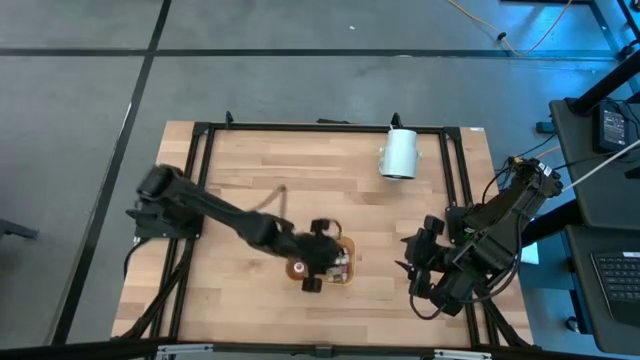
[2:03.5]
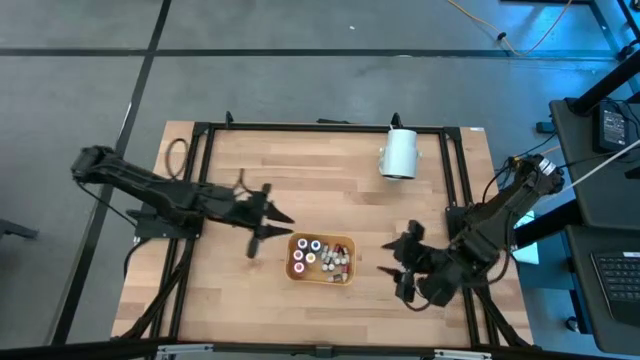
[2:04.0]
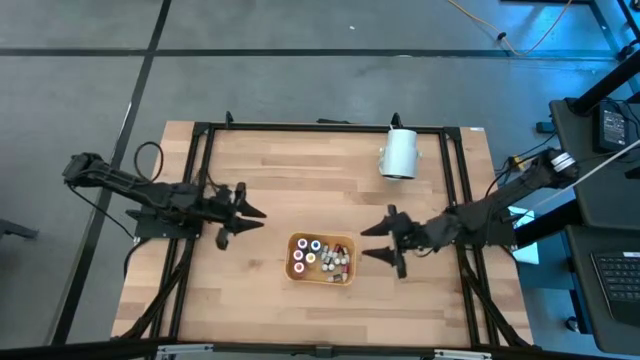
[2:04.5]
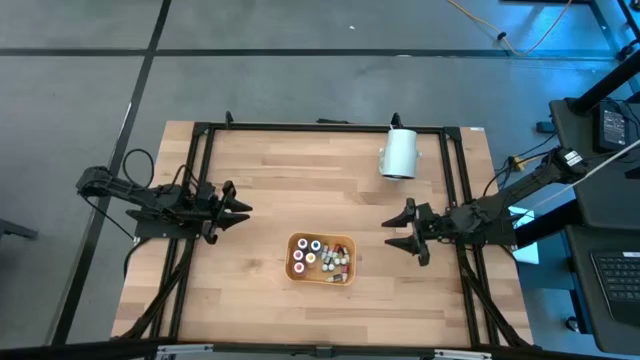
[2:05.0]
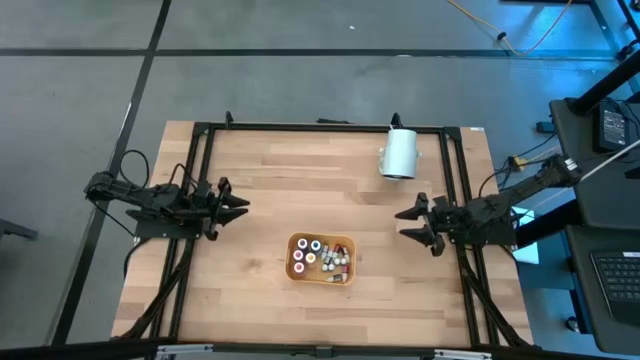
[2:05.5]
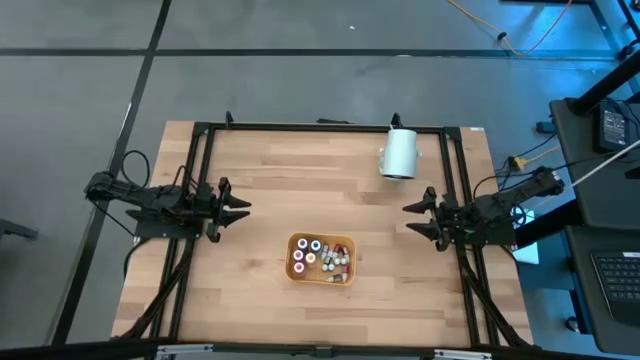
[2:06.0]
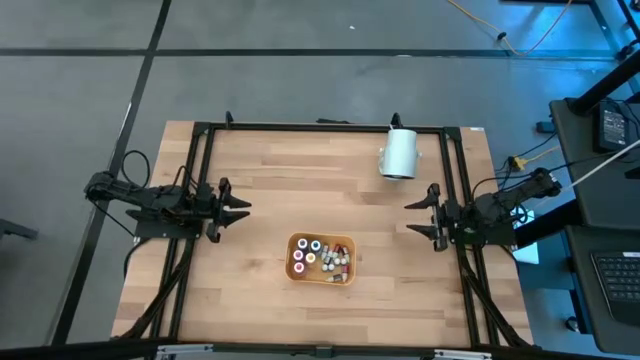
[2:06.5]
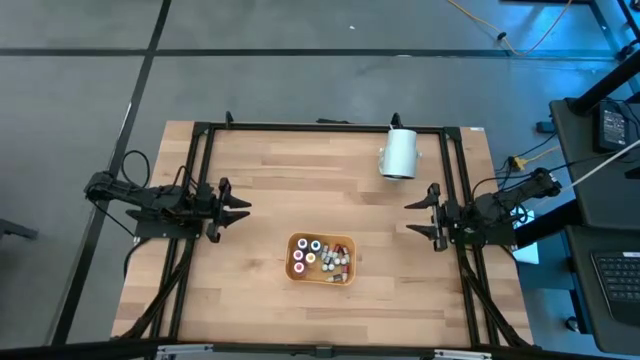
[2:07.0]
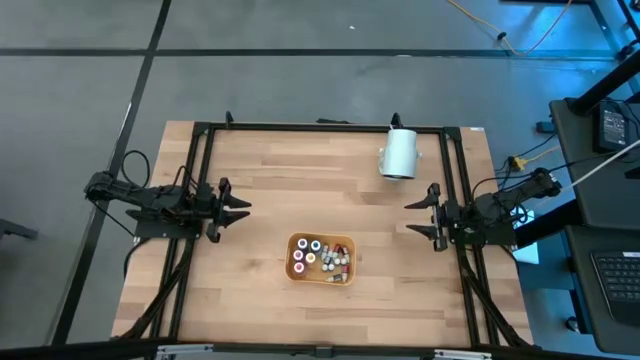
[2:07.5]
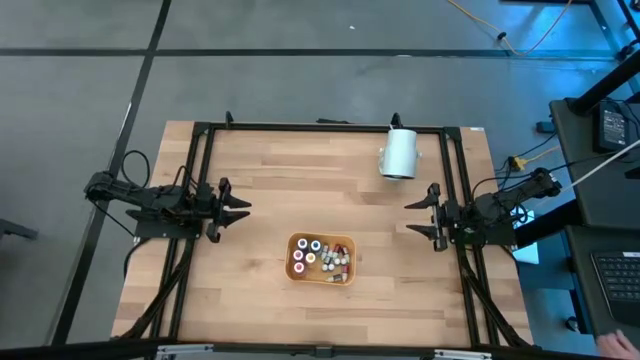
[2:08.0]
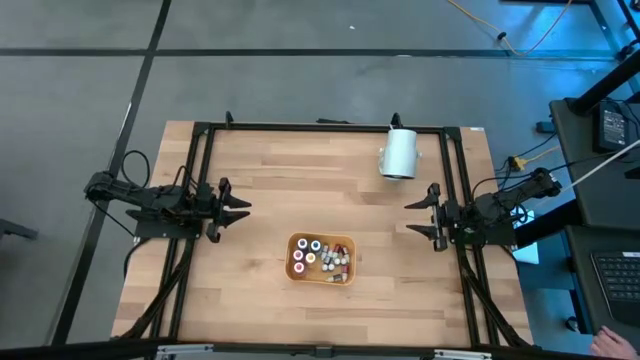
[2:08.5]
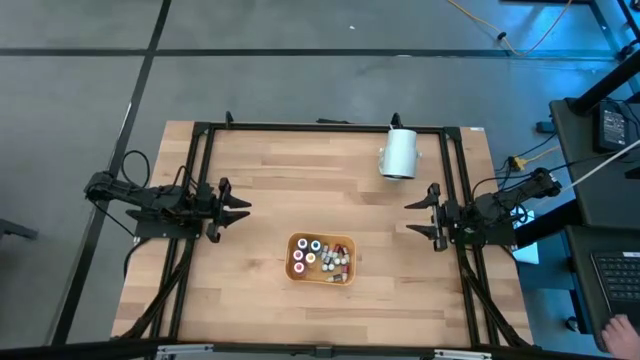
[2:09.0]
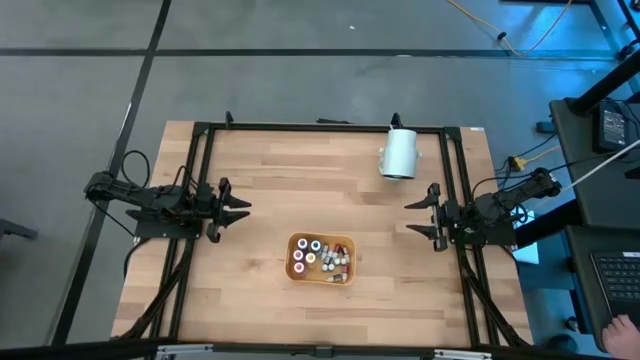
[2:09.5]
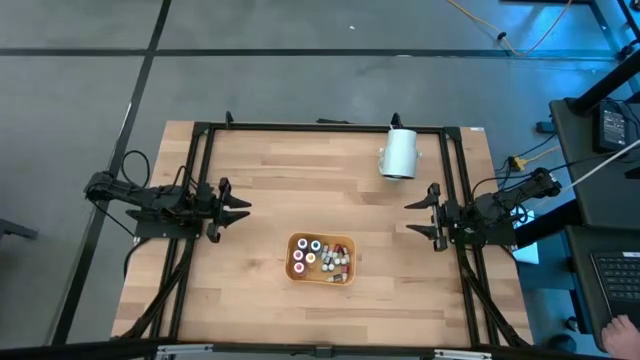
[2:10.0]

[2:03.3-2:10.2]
Task: Pick & Place food coloring
Return to Home Position

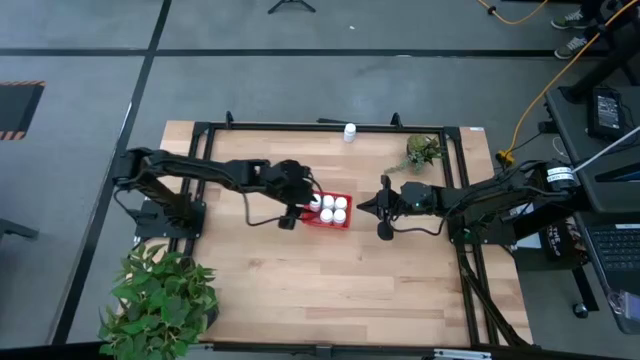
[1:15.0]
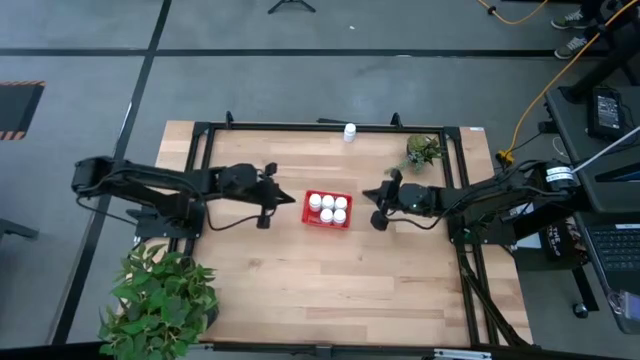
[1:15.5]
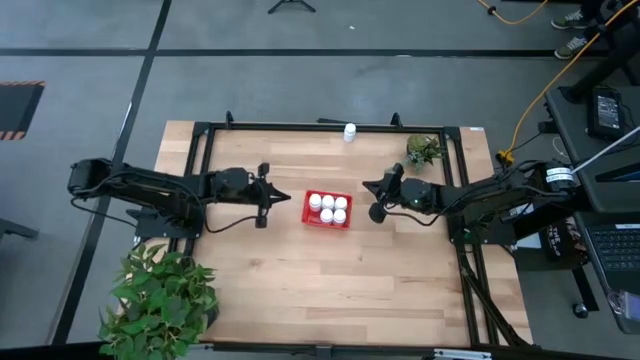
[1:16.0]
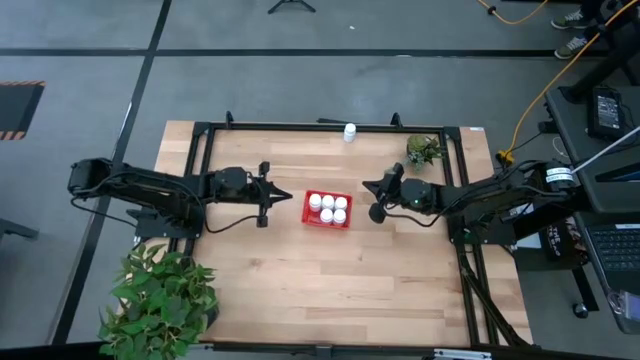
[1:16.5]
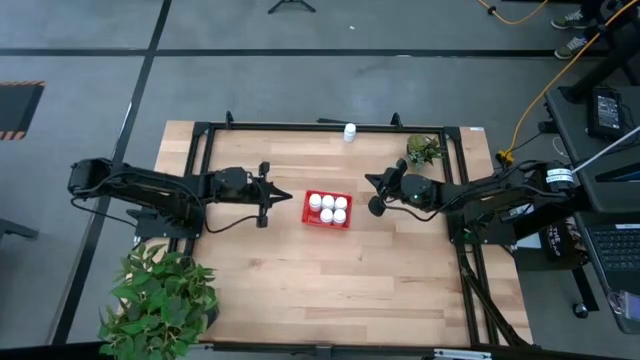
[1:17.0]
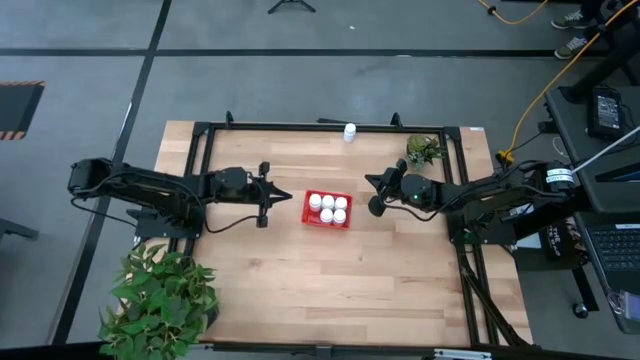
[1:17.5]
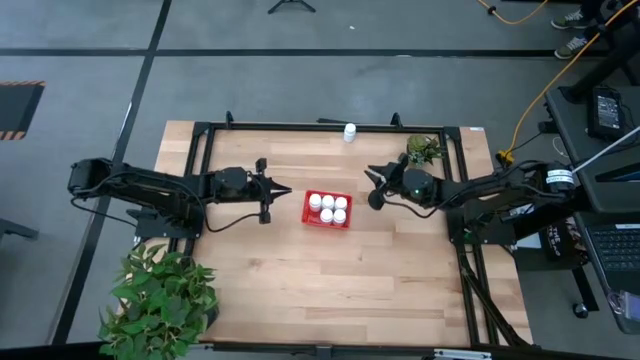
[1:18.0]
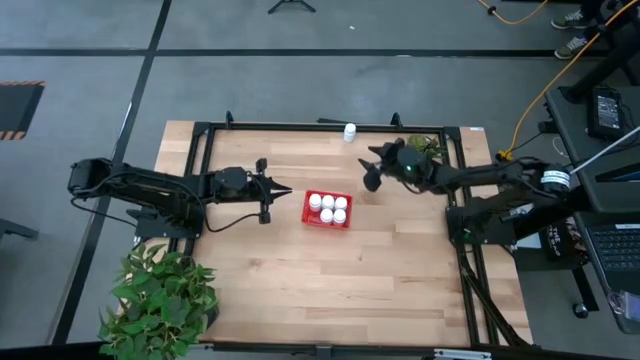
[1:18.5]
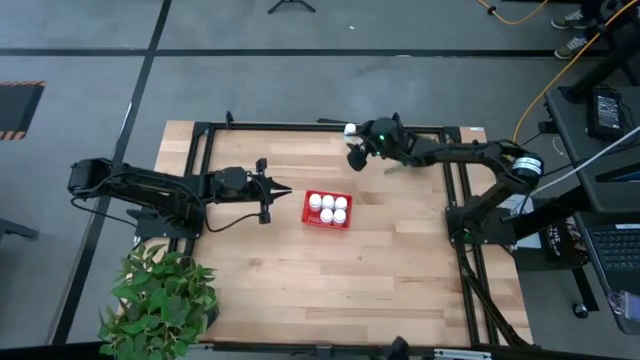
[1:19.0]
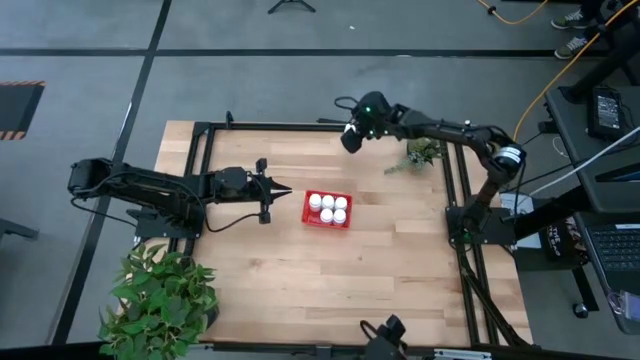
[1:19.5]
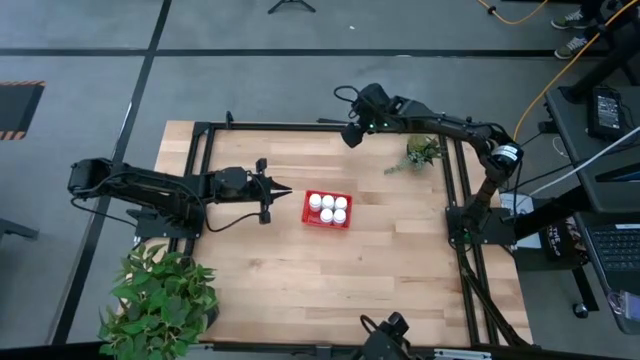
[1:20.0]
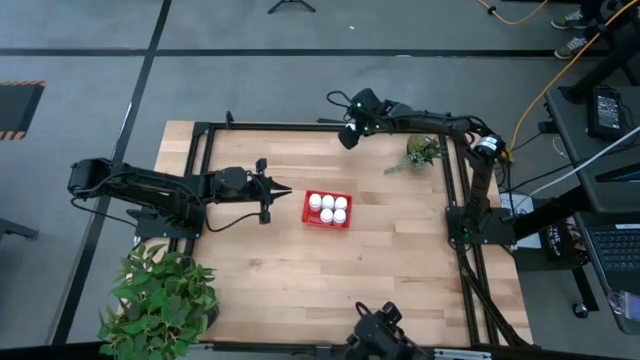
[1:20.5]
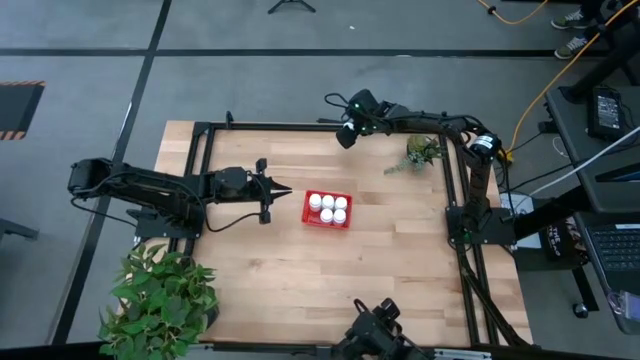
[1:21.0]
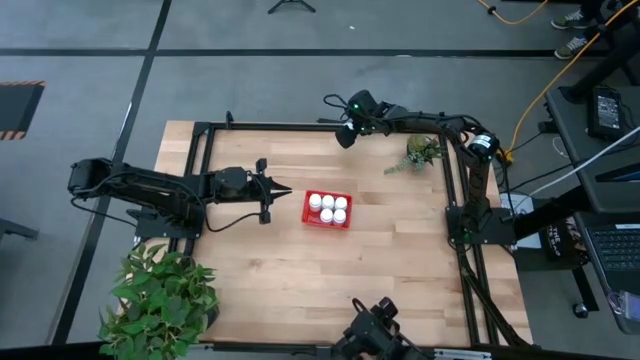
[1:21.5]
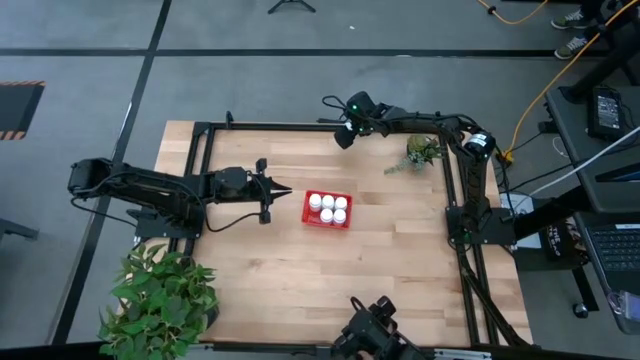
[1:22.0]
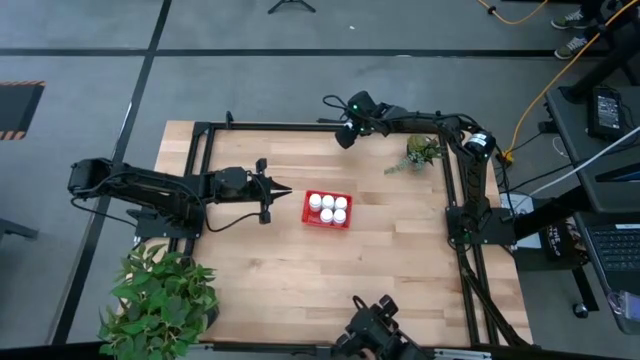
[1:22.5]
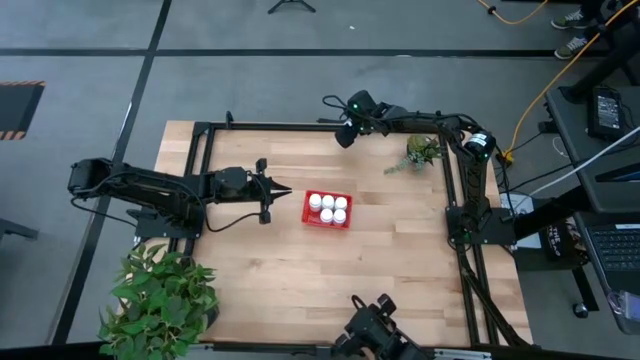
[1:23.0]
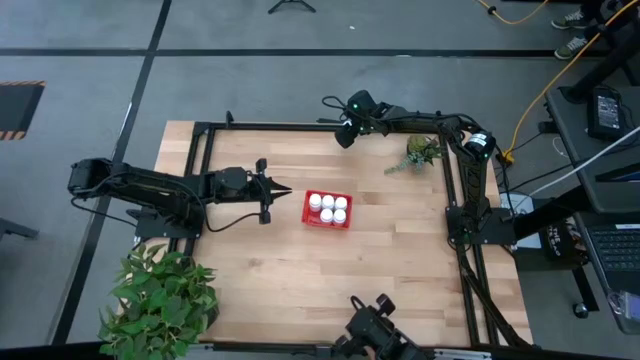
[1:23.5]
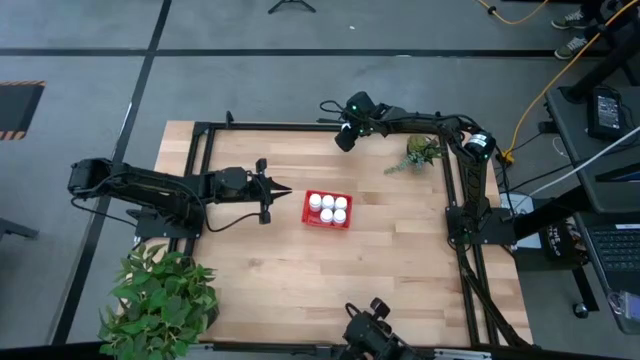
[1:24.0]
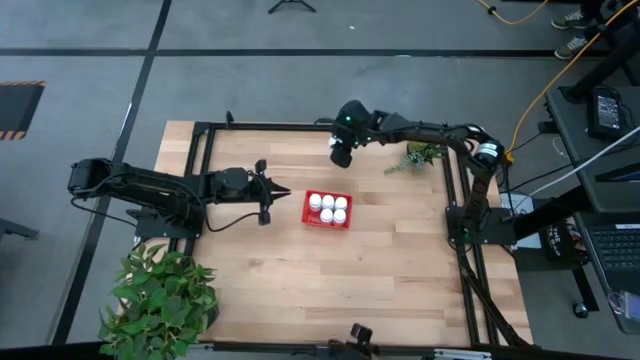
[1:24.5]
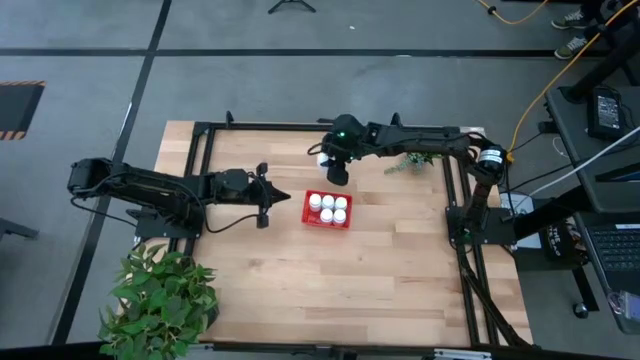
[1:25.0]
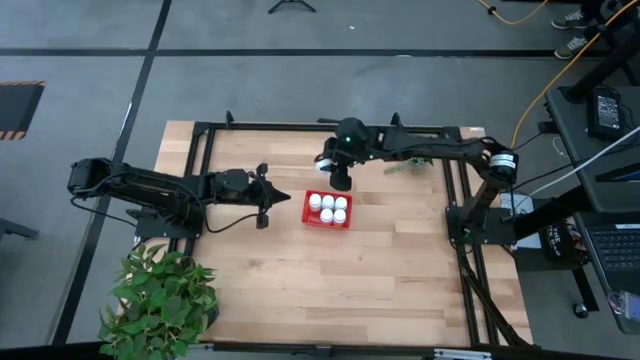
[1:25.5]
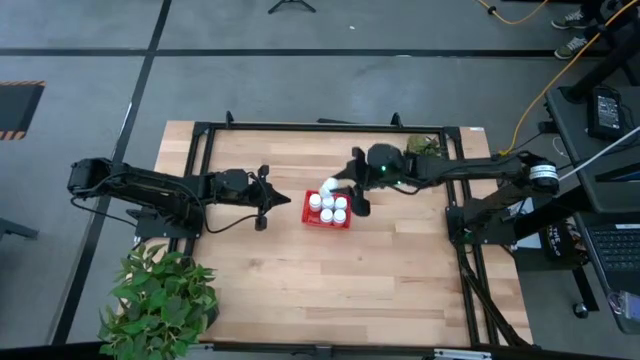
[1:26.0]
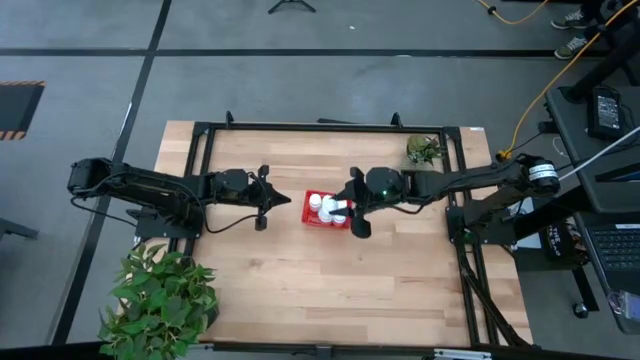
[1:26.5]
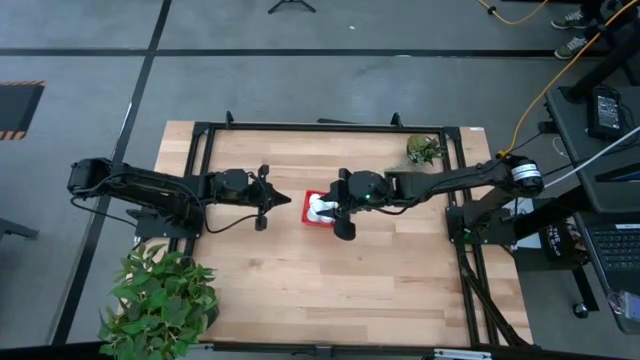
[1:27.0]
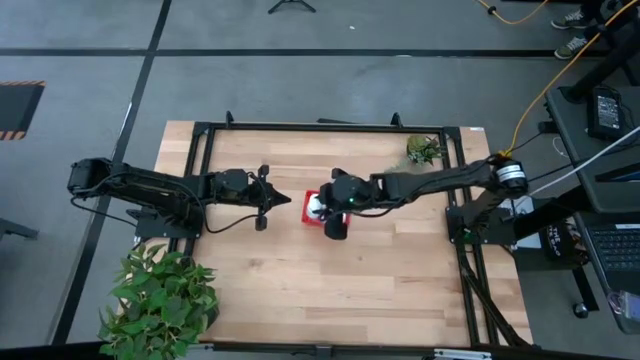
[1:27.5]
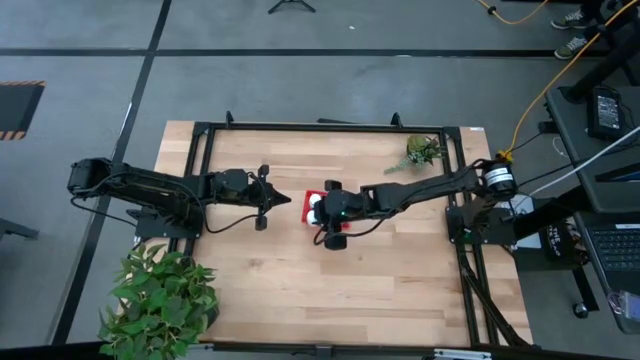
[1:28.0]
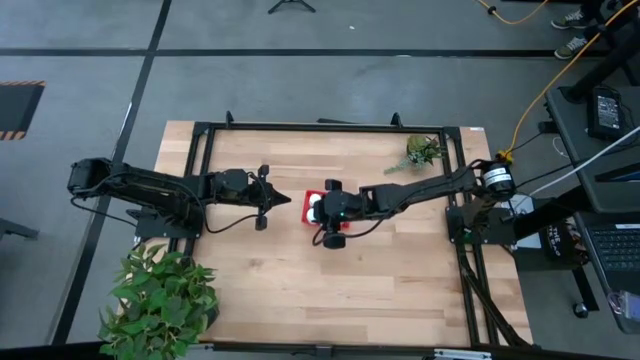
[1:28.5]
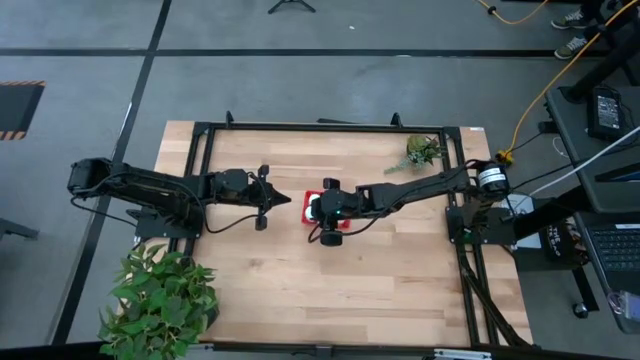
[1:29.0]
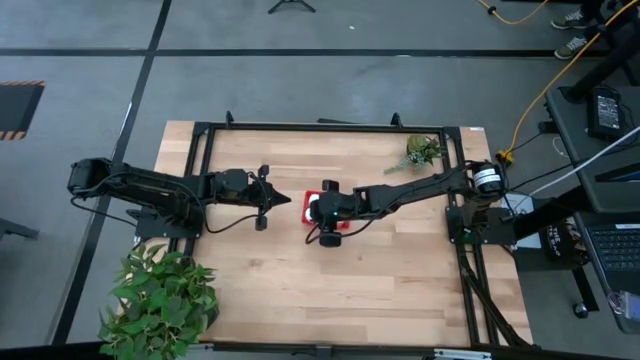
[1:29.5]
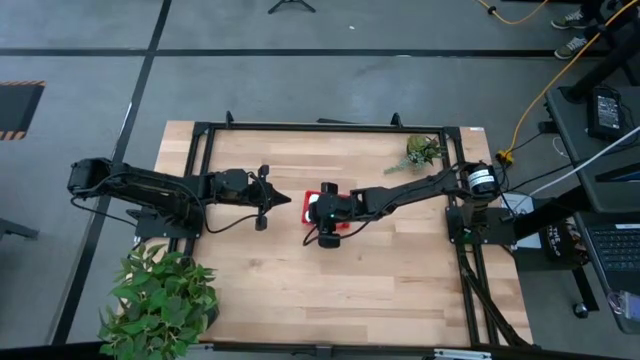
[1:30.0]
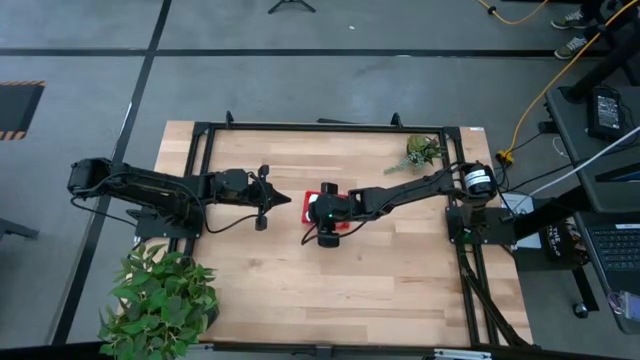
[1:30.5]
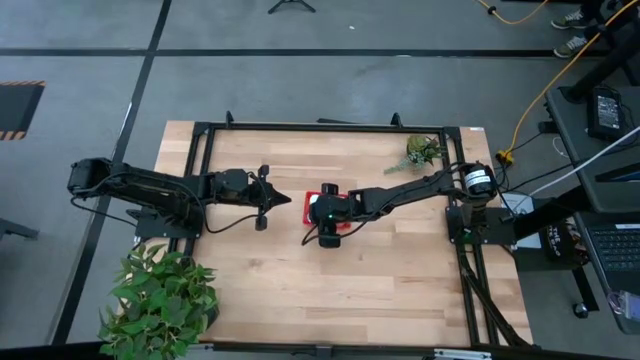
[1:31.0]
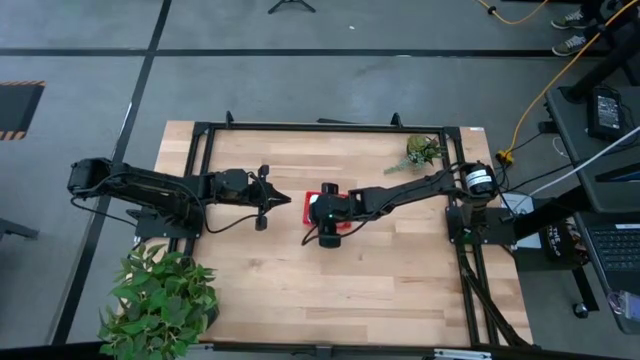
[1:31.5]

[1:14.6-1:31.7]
Task: Pick and place pill bottles into a basket
Put the white pill bottle into the red basket
